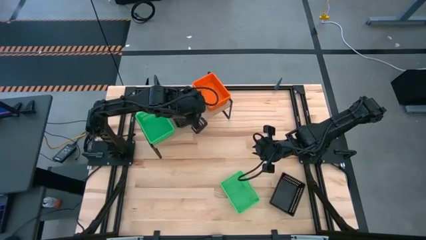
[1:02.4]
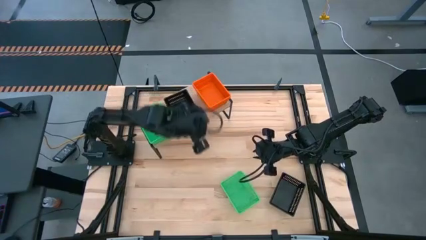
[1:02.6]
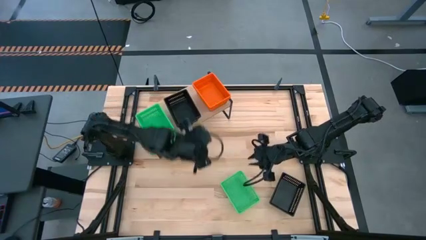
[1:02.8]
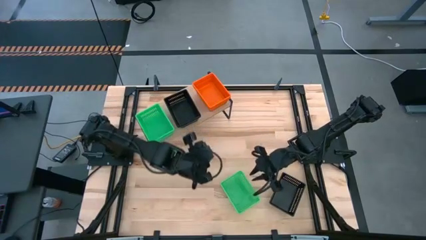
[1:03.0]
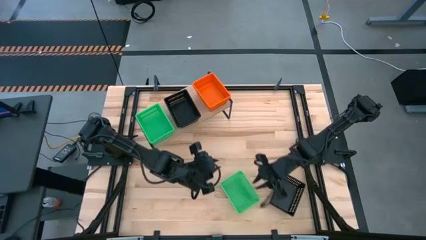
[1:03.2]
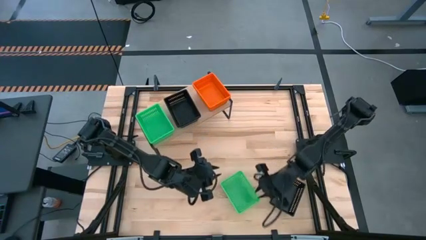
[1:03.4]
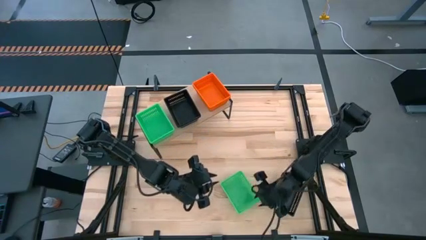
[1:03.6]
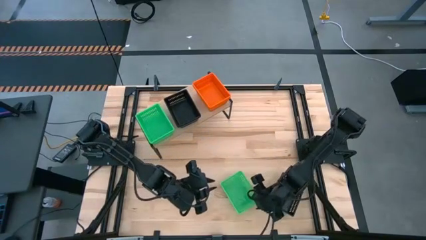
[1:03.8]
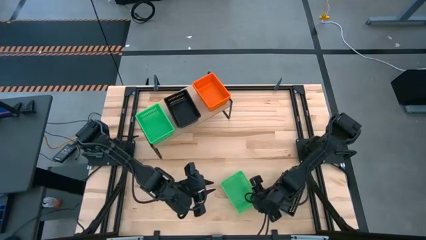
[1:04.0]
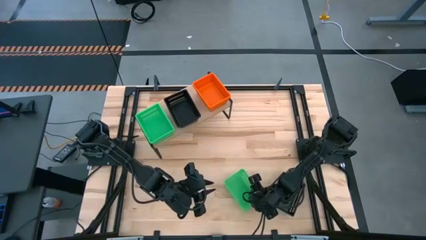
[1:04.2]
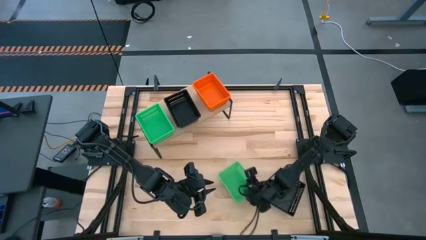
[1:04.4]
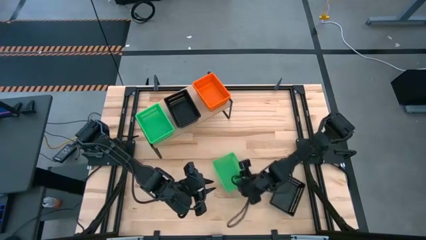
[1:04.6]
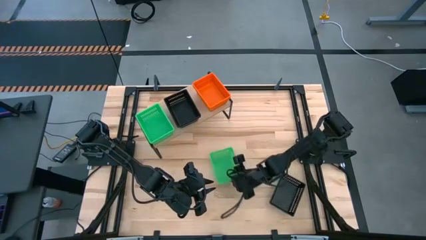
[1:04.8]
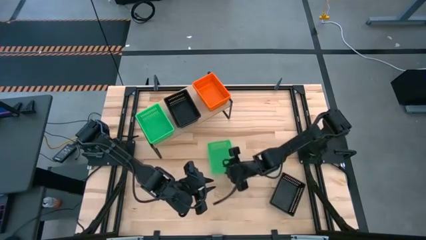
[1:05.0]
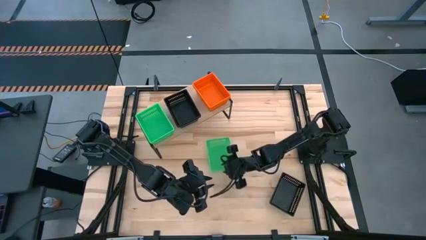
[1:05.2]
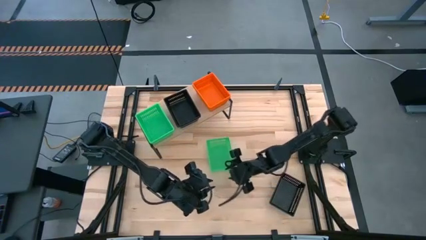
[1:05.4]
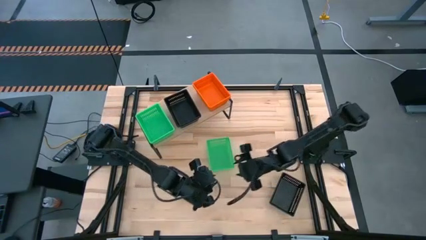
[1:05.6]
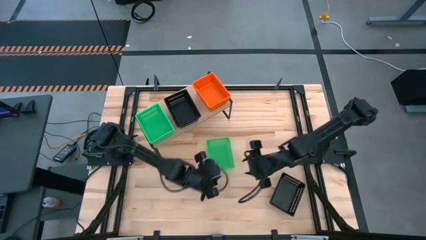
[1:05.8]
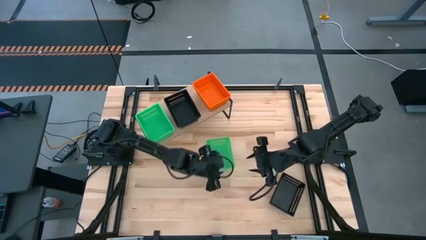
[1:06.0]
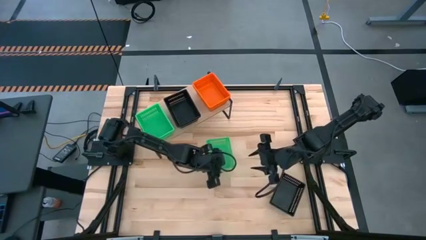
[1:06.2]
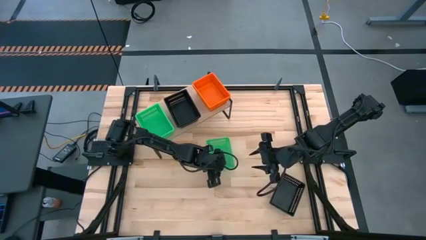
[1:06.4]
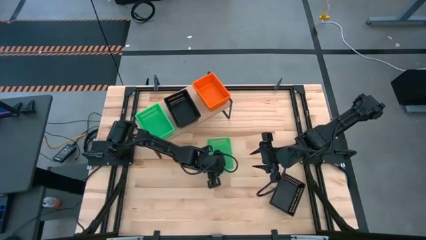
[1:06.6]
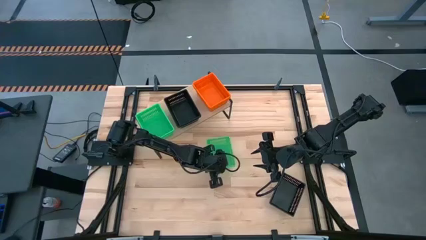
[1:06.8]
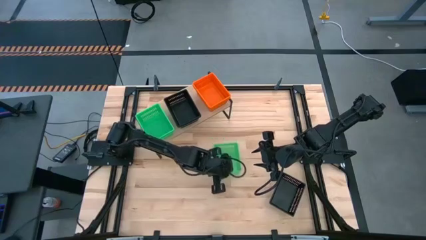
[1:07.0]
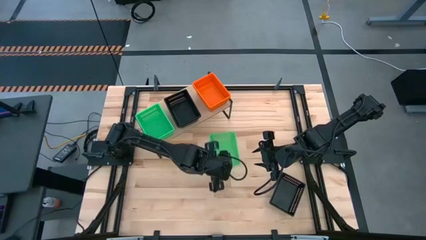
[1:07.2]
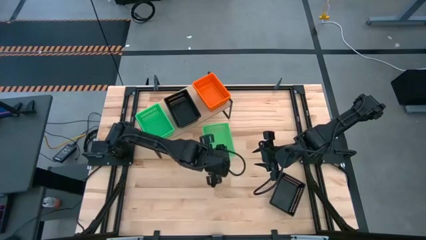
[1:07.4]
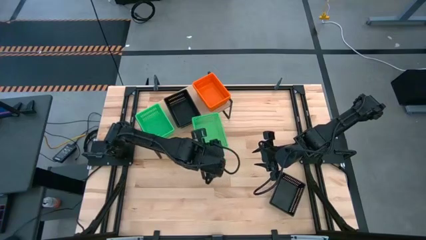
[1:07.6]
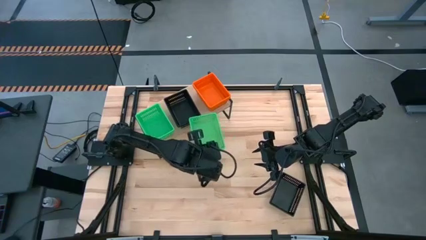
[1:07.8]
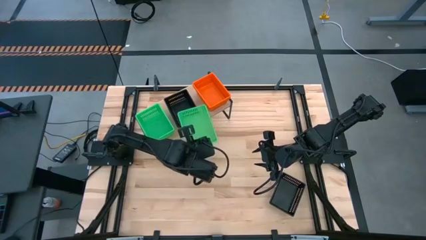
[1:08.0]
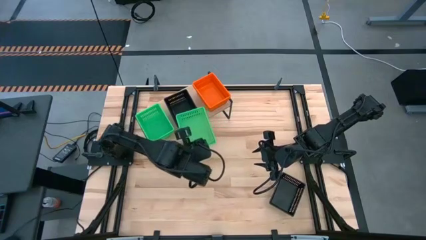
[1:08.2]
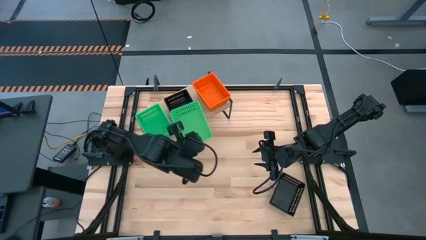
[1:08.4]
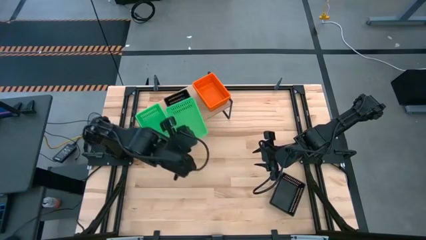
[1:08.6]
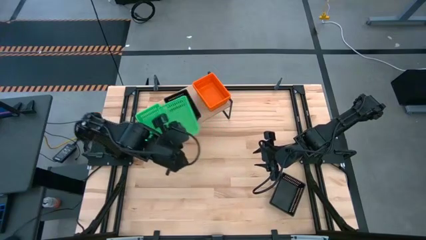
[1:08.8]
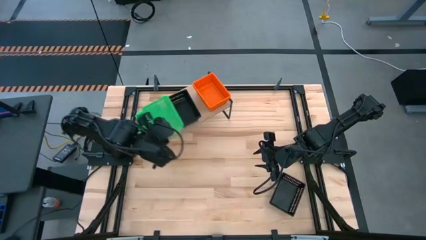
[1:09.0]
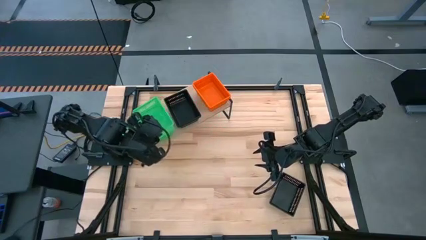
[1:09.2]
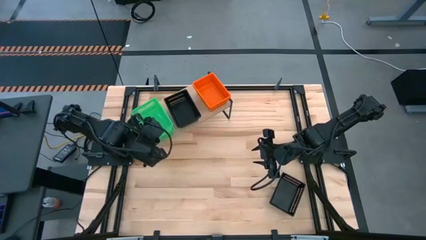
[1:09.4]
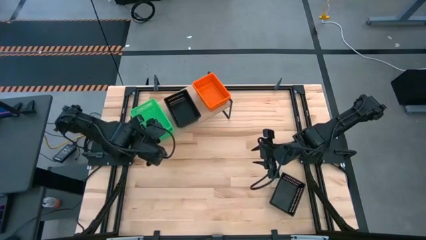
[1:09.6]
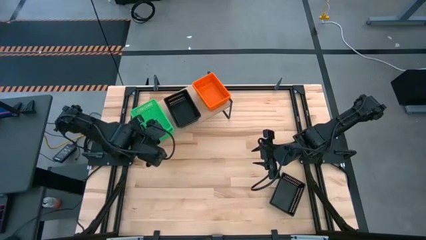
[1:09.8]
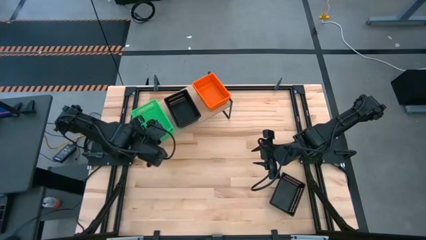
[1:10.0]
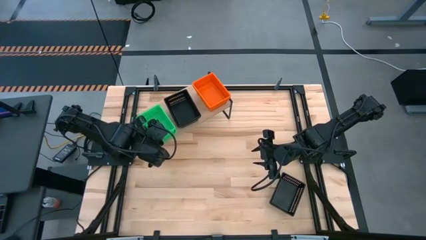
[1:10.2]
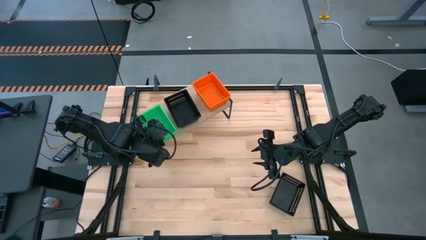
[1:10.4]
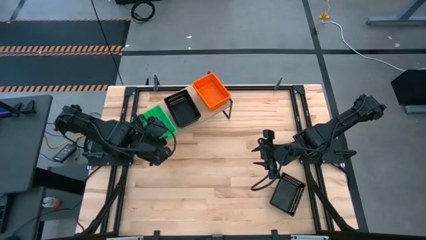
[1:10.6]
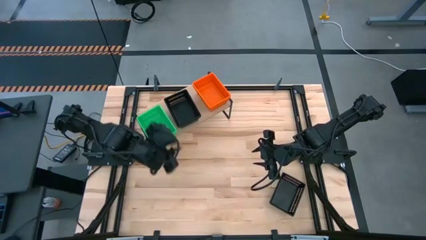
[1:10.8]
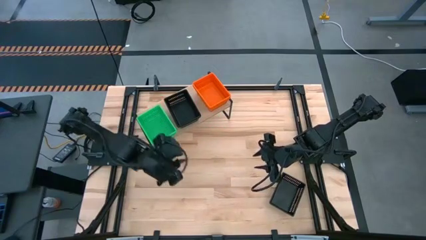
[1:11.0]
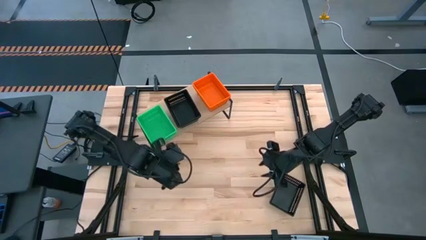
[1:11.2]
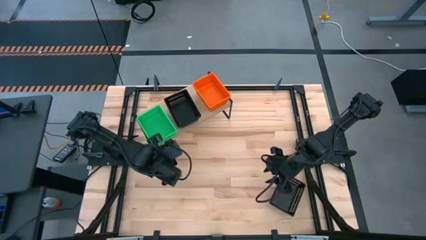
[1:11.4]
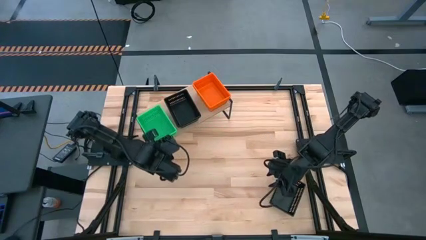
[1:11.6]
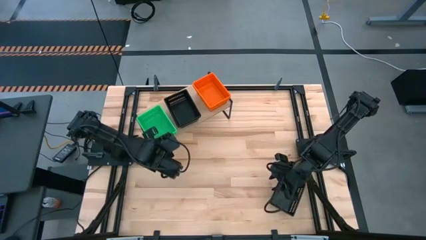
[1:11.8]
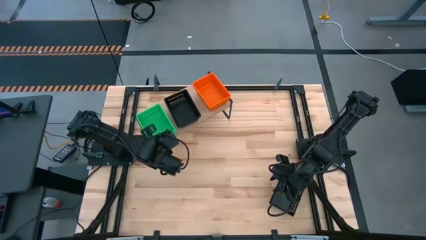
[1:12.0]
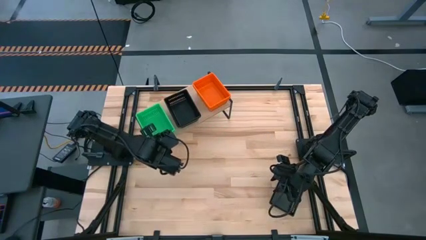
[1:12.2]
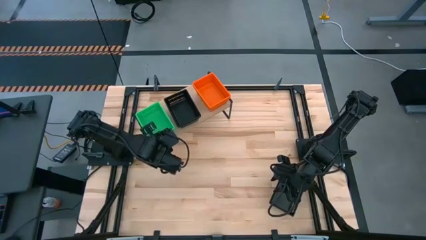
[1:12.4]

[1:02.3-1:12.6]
Task: Stack baskets on shelf by color
Stack the green basket on the green baskets on the shelf

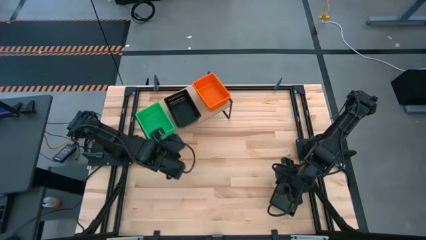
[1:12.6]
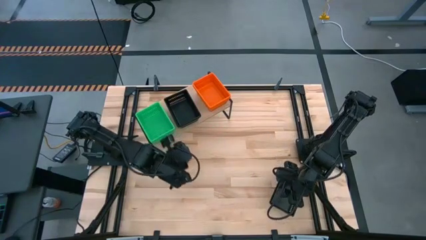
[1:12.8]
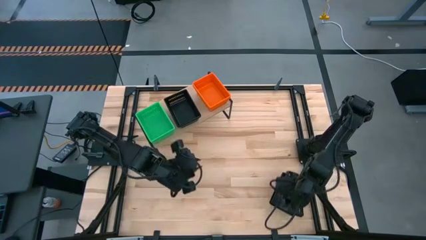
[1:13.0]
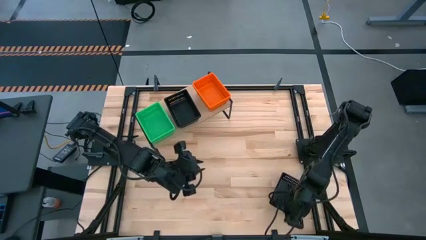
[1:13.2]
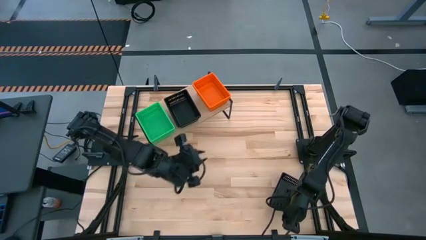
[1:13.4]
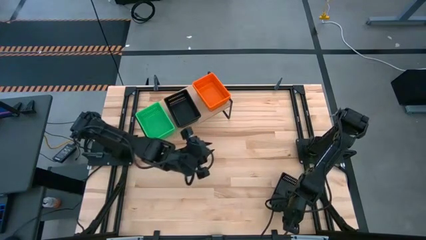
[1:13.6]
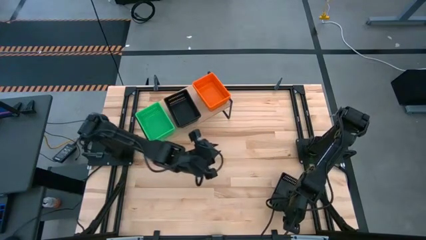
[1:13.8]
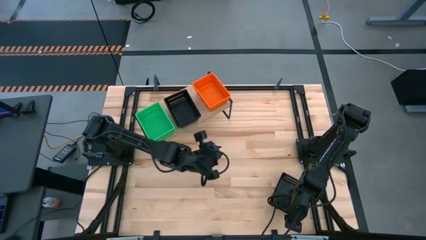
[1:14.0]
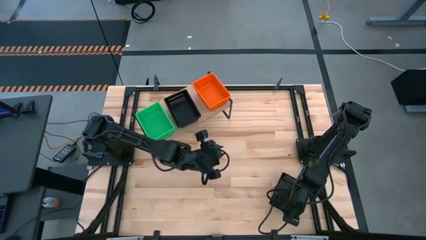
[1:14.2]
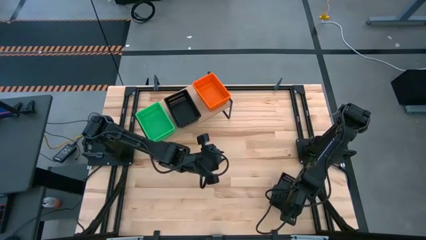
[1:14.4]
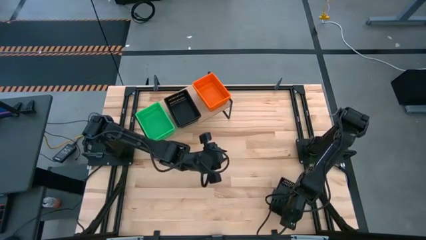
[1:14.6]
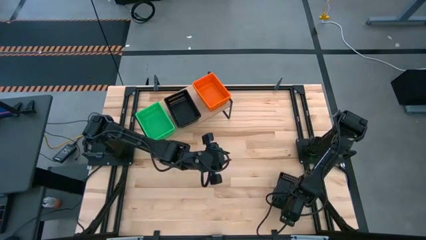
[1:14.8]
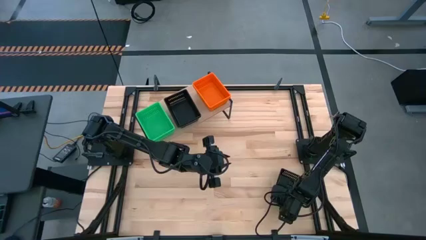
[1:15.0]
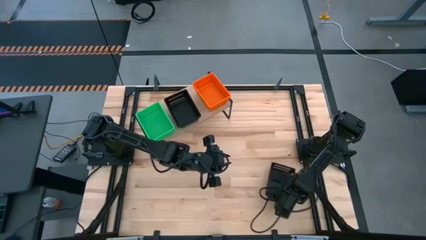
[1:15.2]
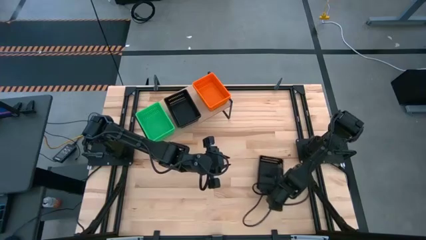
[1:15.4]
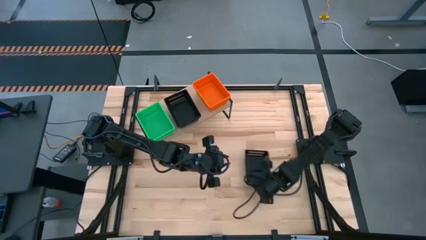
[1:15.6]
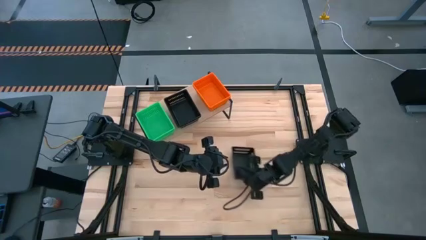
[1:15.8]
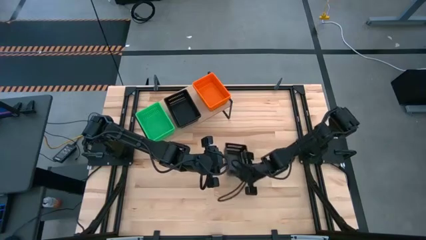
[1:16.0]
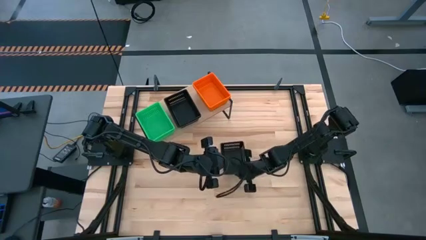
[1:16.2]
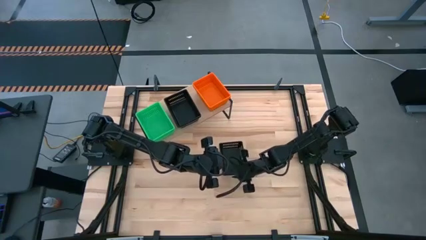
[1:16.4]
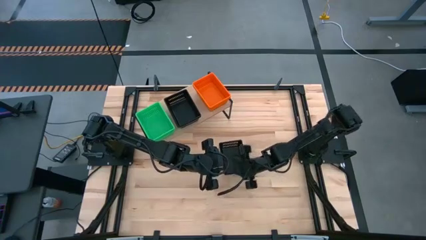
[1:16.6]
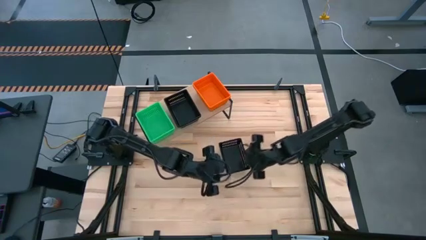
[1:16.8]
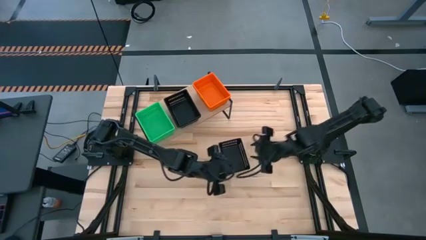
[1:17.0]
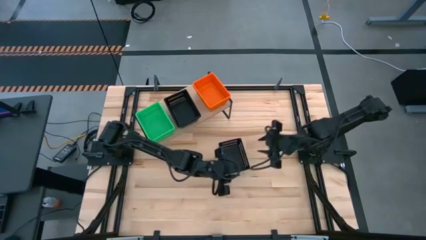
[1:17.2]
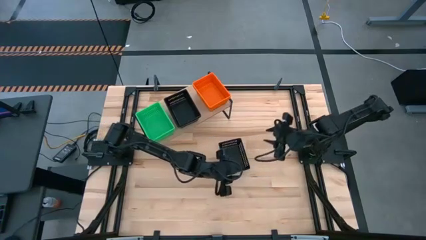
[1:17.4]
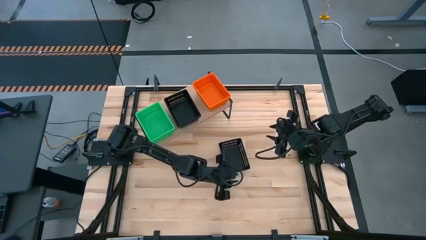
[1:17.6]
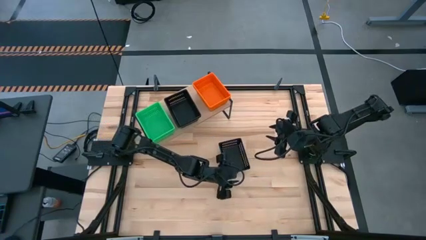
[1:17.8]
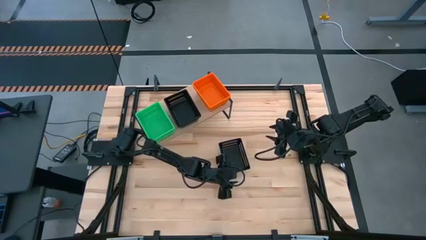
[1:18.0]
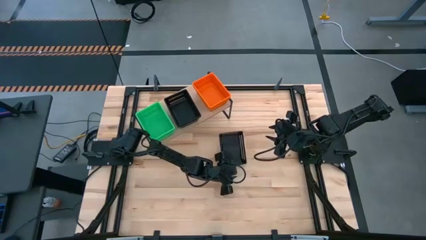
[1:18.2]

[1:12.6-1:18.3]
Stack the black basket on the black baskets on the shelf
